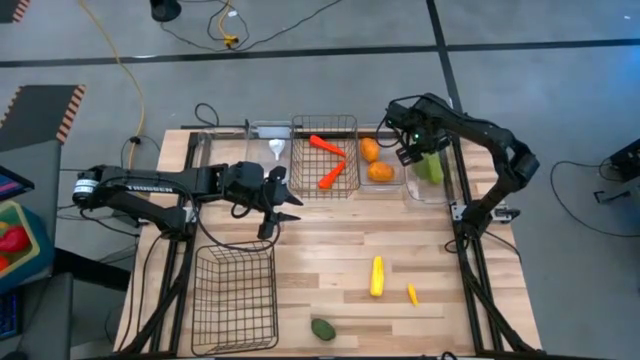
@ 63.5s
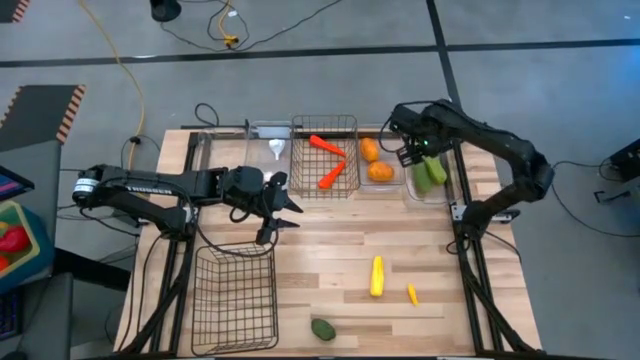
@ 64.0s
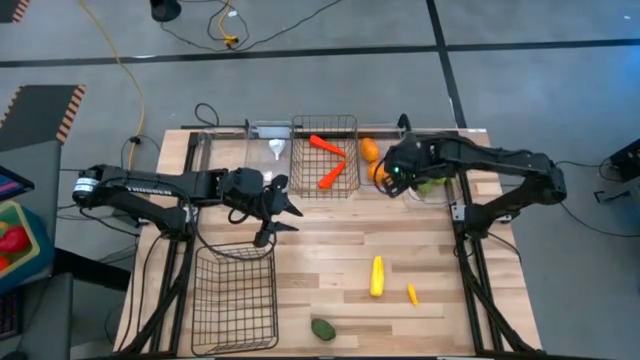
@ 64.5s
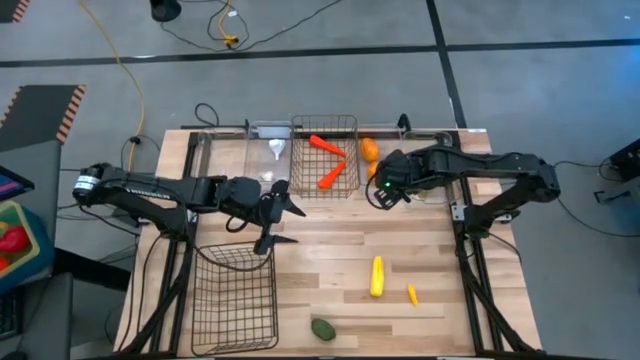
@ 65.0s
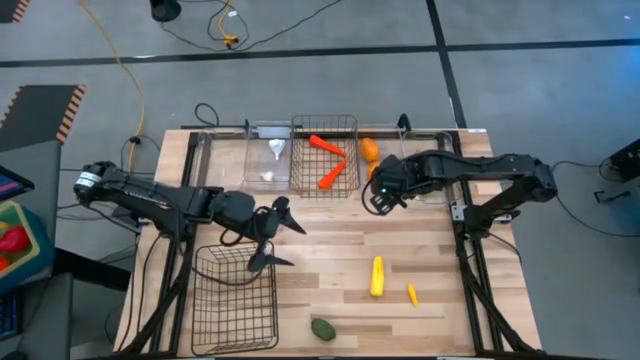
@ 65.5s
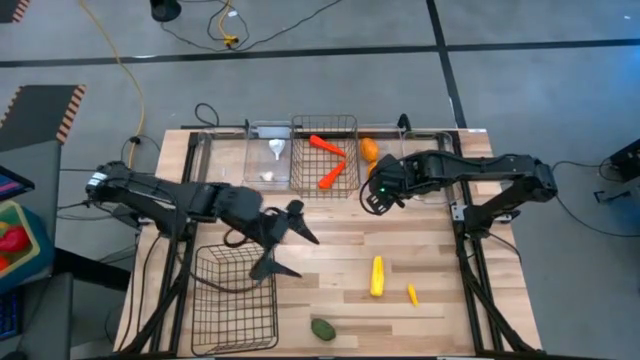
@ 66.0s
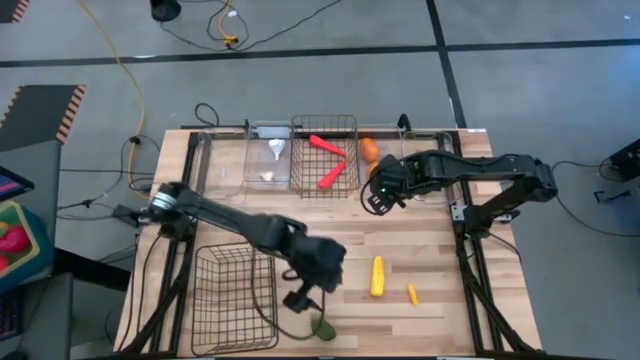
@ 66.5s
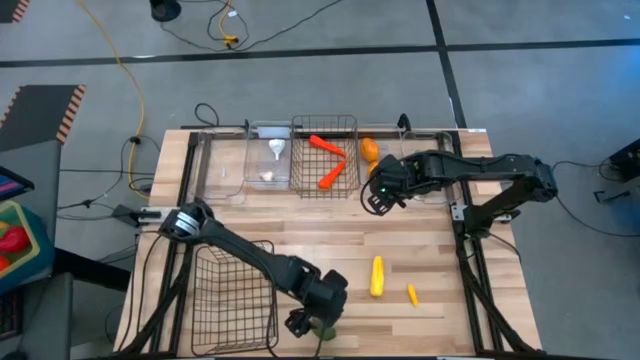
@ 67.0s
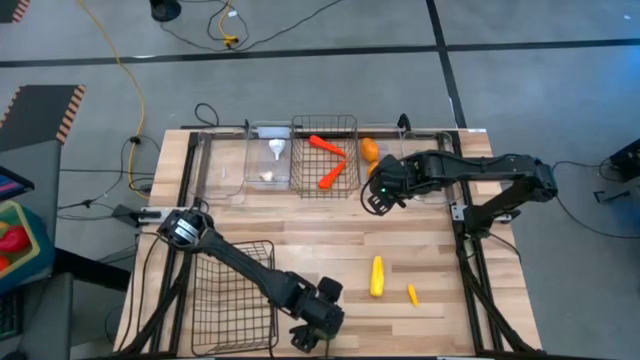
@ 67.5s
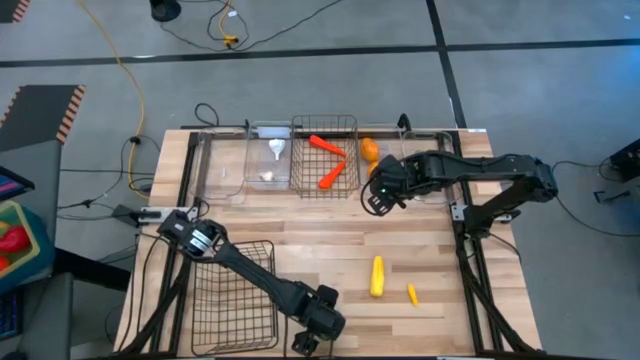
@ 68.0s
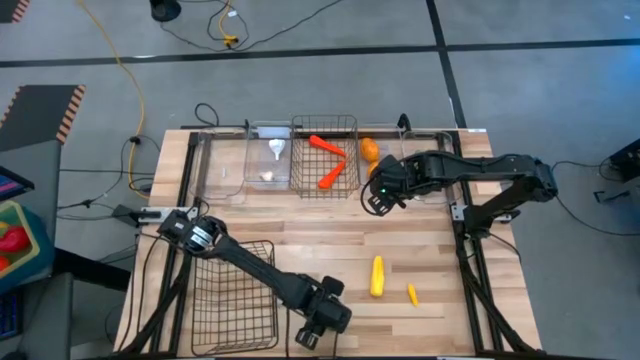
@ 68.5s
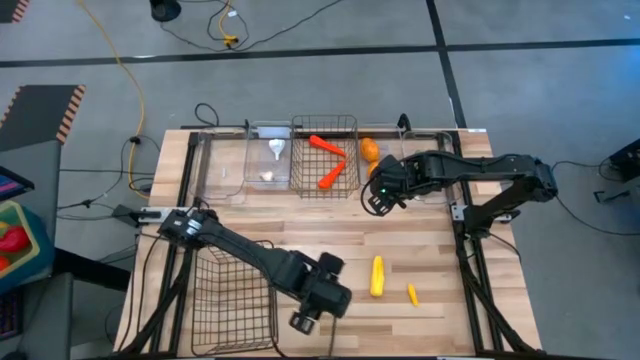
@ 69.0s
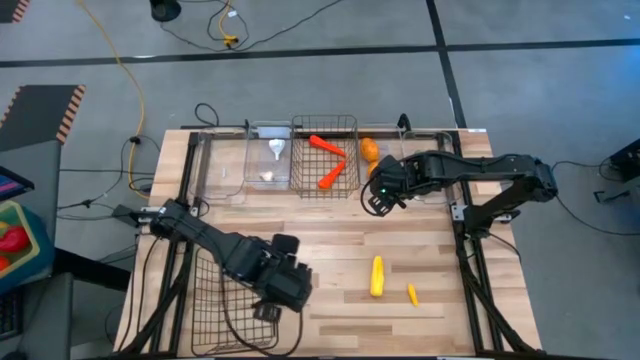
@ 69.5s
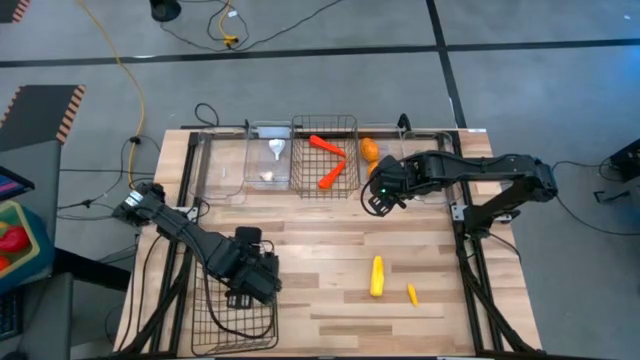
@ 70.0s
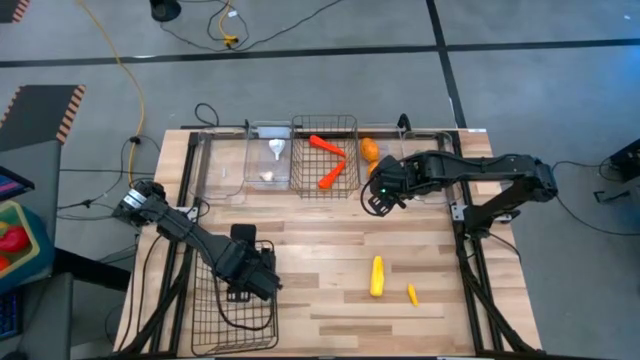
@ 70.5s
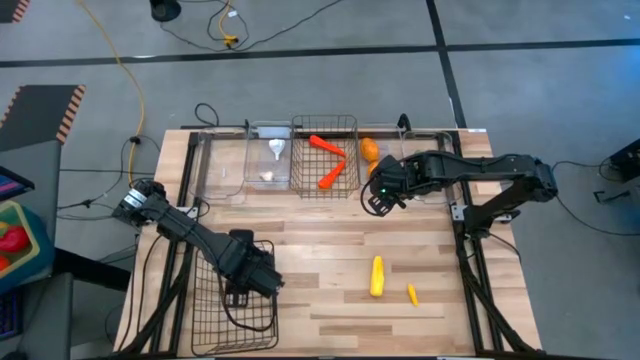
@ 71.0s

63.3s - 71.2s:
Task: Sort produce into baskets
Put the green lime into the bottom wire basket

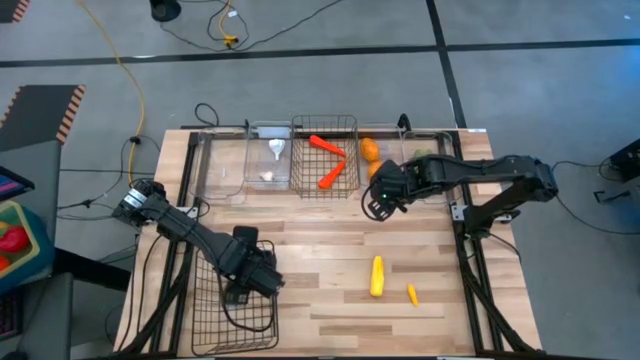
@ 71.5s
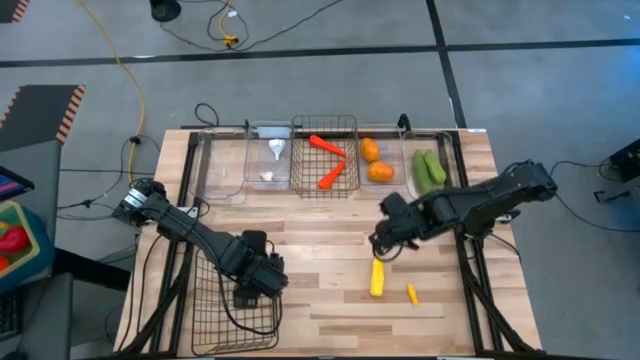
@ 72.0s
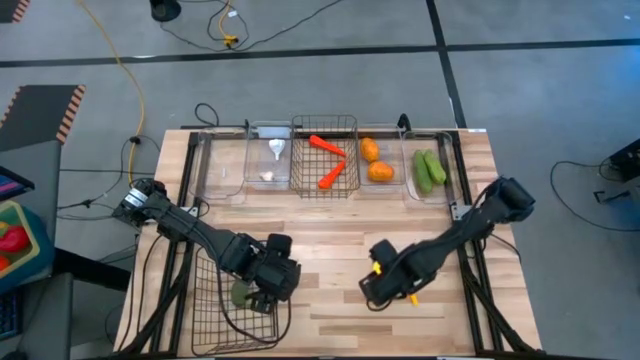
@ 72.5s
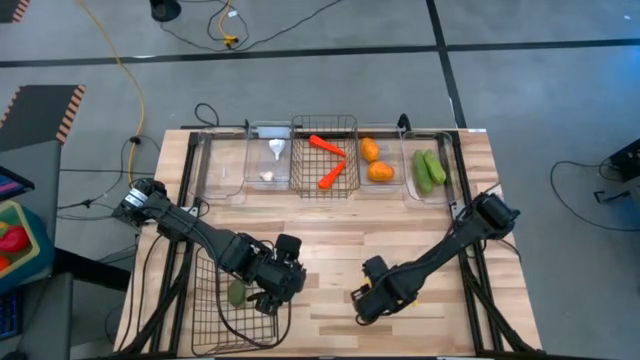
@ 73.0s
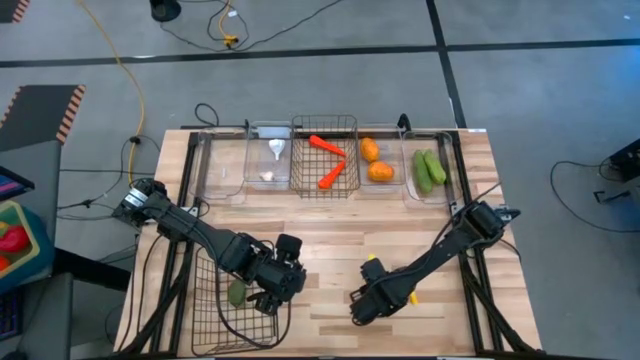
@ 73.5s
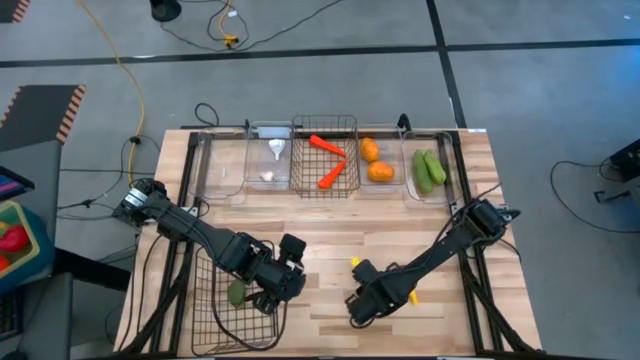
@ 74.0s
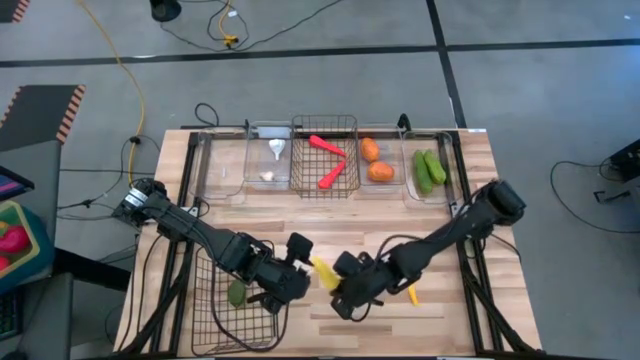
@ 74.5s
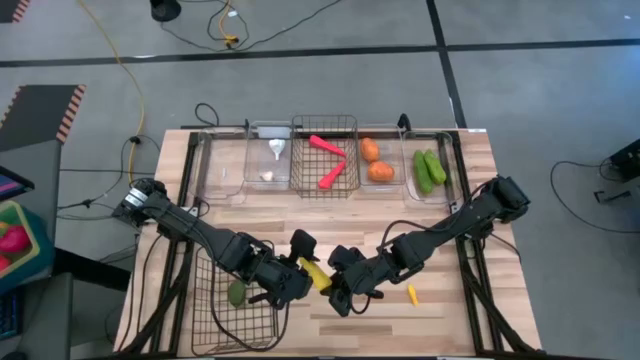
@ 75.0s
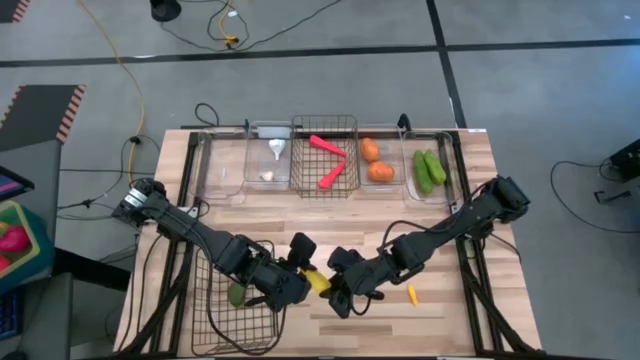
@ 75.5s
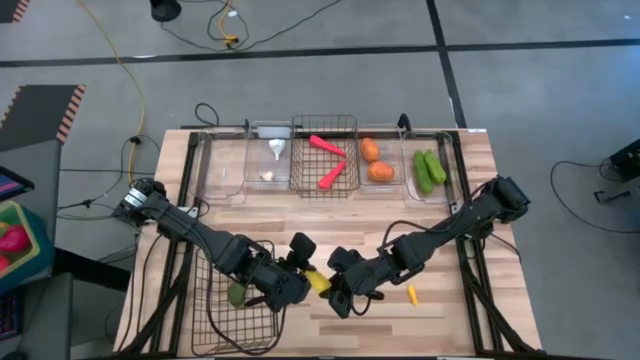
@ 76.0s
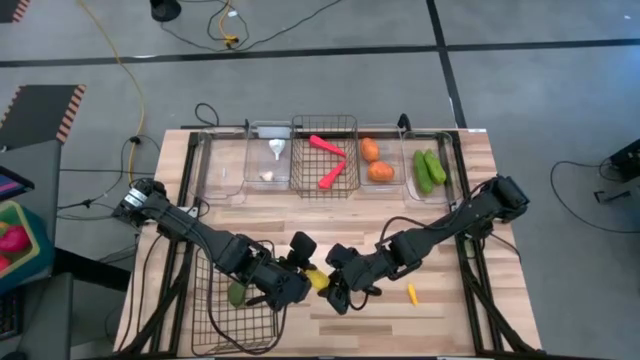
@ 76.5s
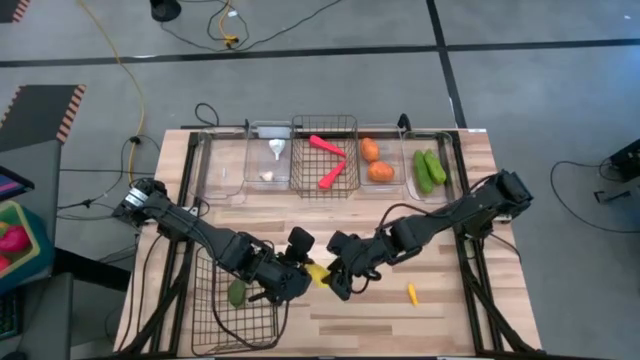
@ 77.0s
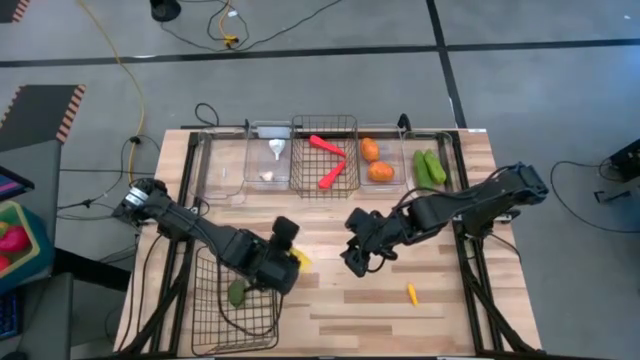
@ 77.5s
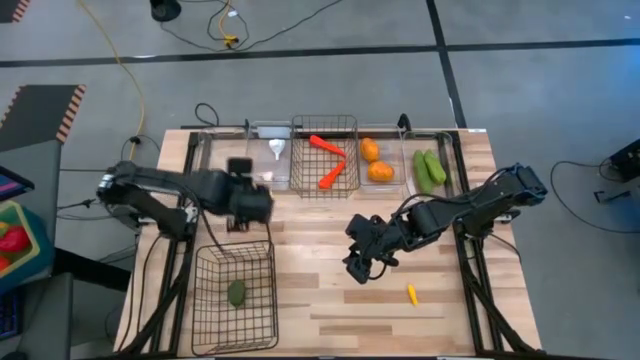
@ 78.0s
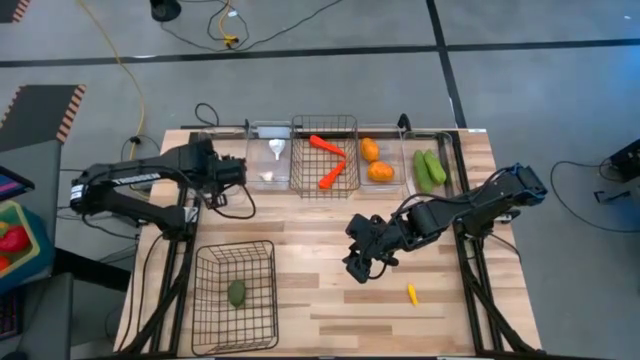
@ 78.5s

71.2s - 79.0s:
Put the left yellow corn into the left transparent bin

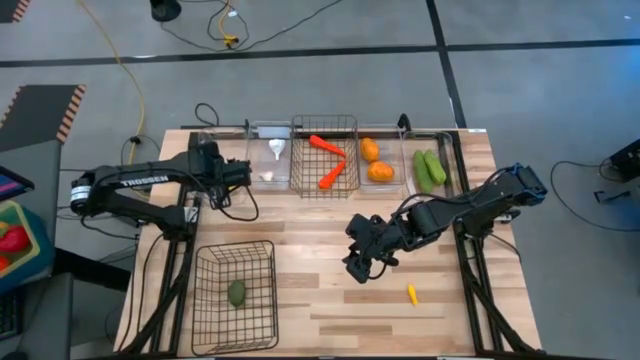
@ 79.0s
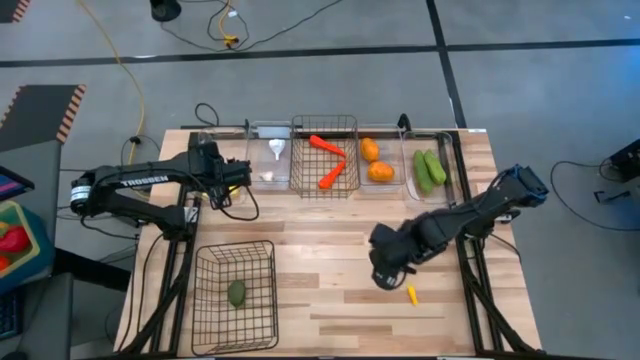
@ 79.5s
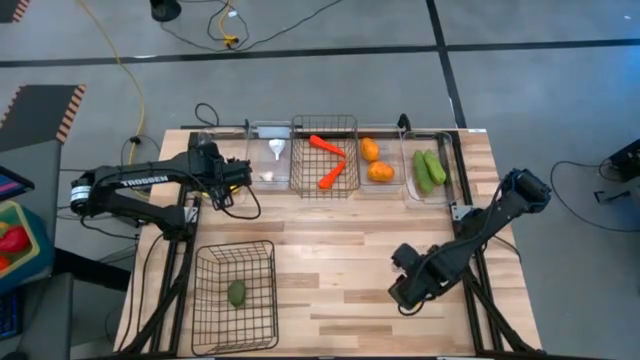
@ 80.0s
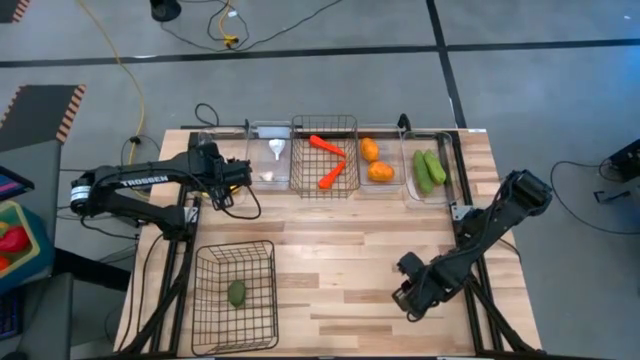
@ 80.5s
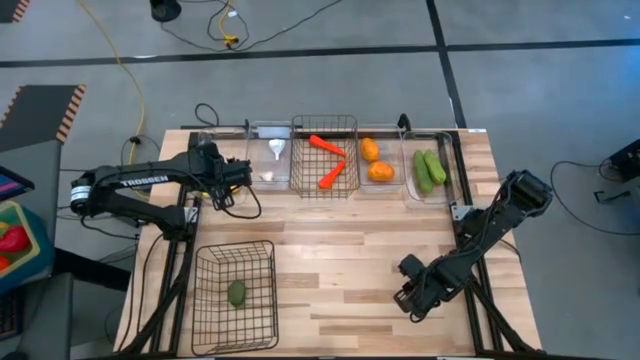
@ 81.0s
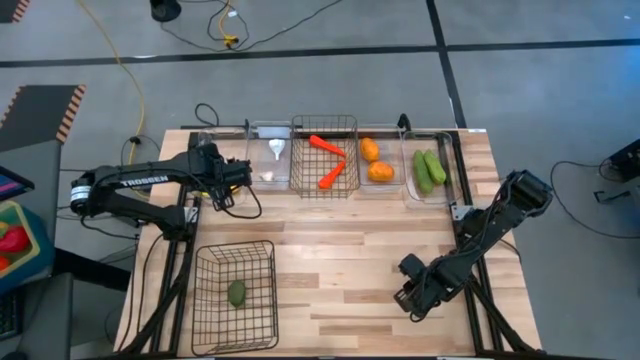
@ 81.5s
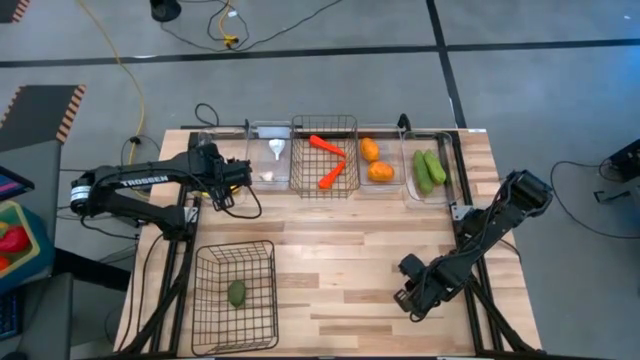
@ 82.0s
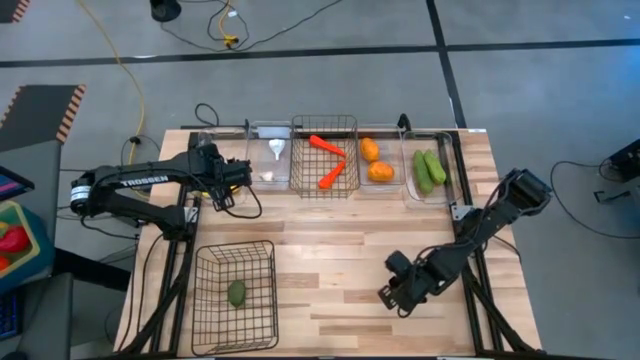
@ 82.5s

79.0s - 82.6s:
Put the yellow corn into the left transparent bin

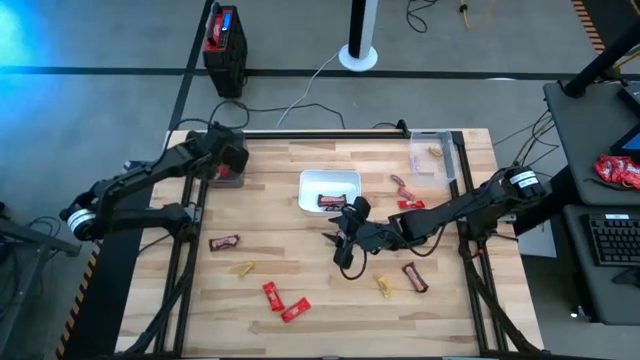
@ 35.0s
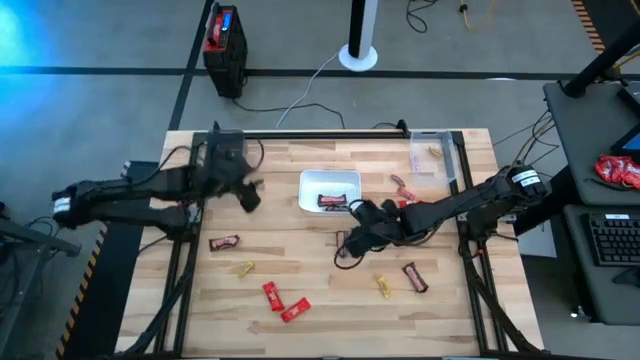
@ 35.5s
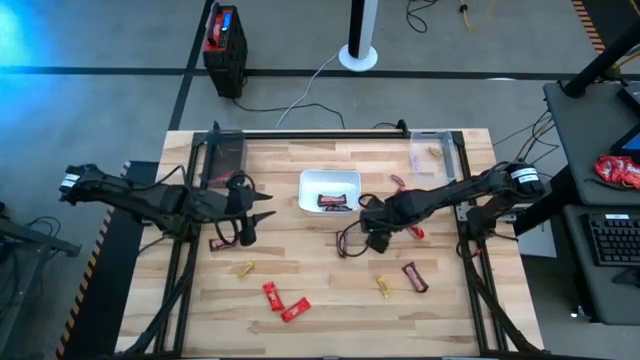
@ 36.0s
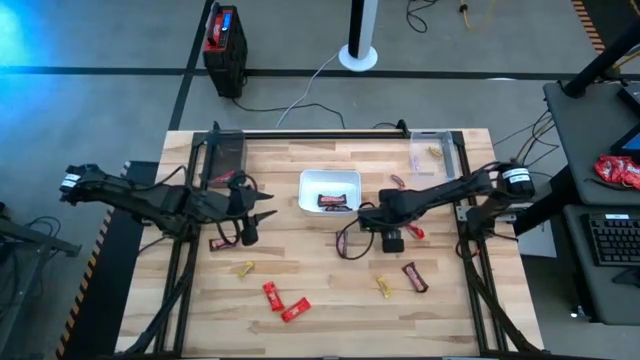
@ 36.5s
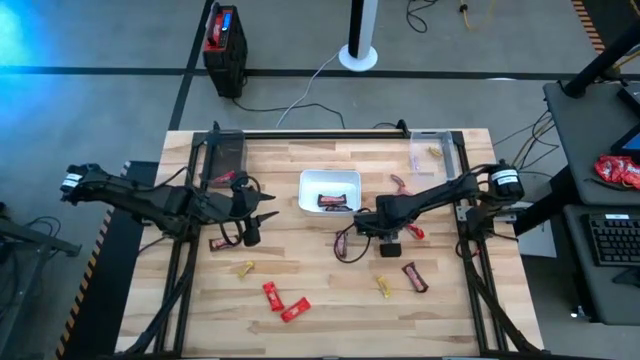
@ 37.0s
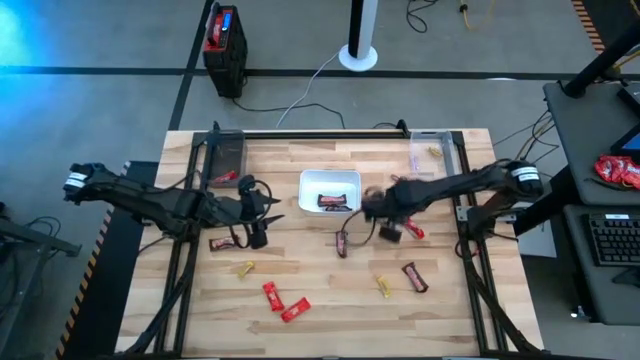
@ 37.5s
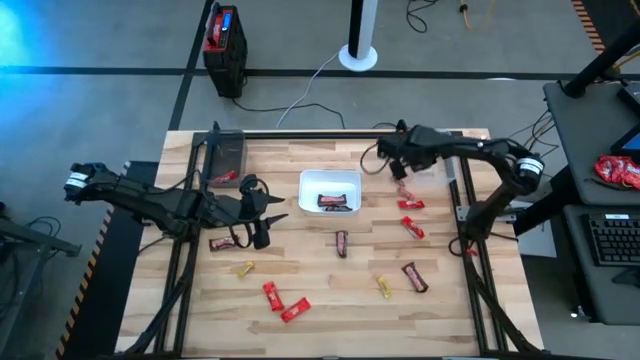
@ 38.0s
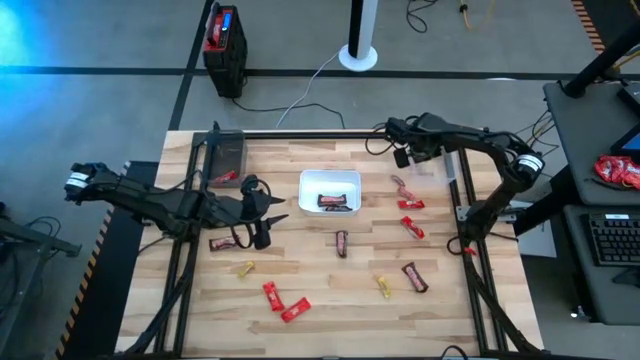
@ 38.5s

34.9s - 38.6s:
Task: Sort candy by brand, put in halloween buckets
Put the yellow candy into the transparent bin
